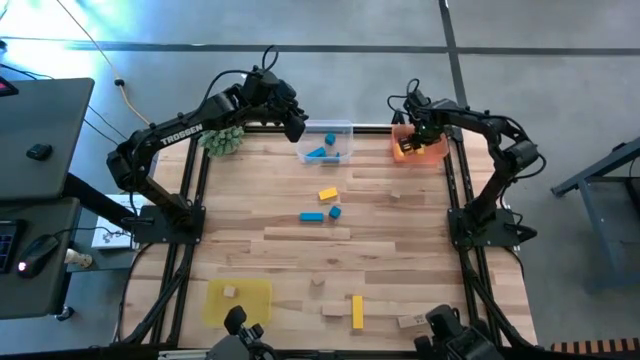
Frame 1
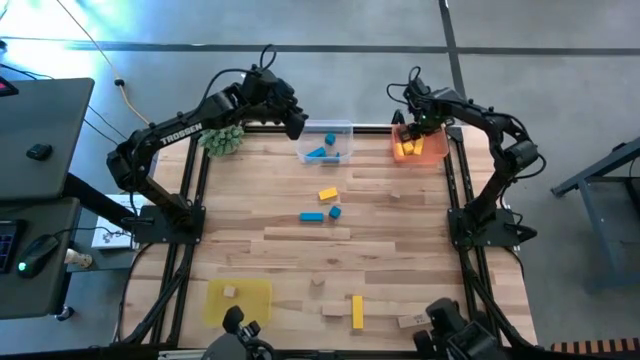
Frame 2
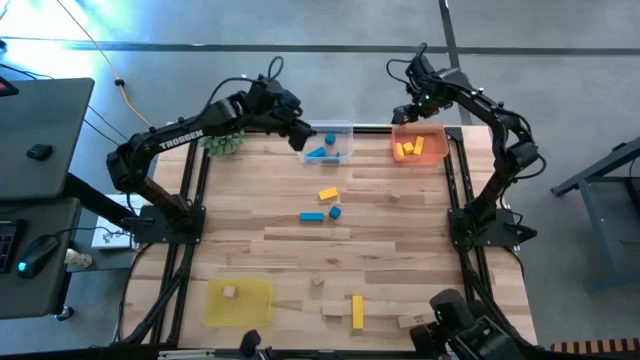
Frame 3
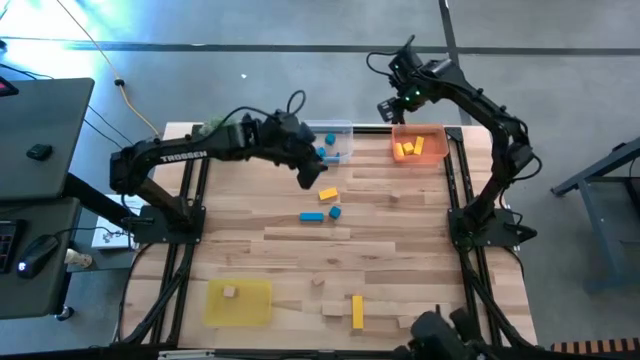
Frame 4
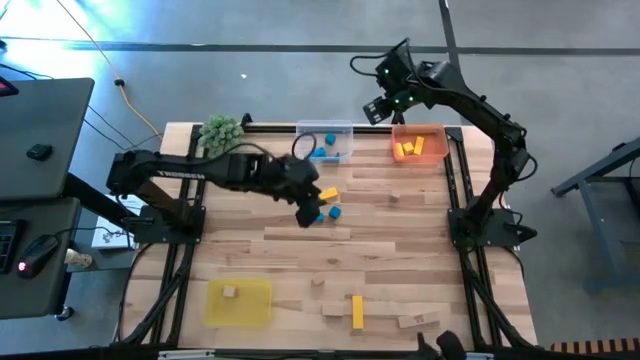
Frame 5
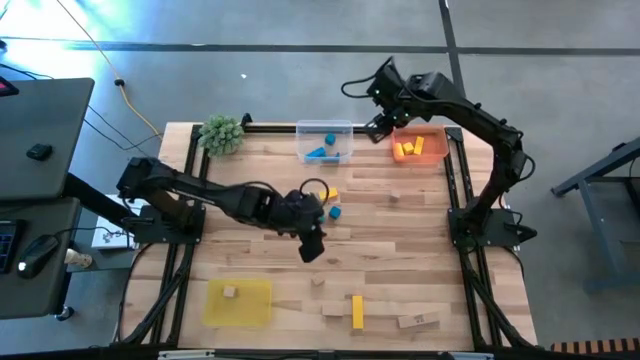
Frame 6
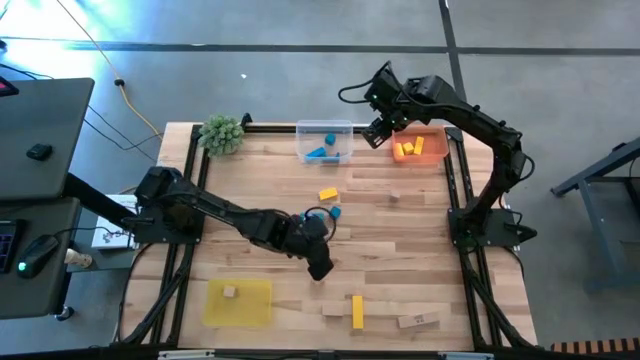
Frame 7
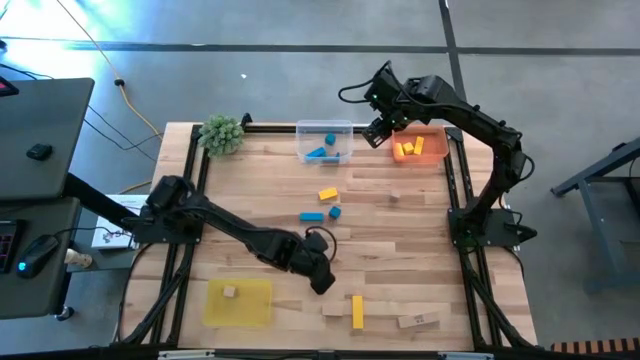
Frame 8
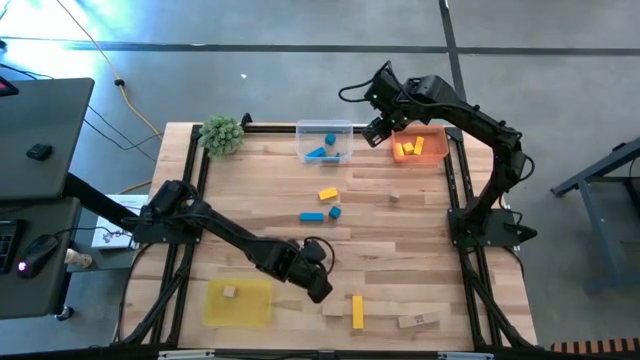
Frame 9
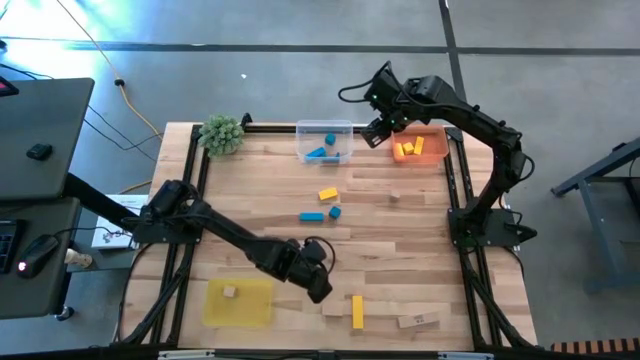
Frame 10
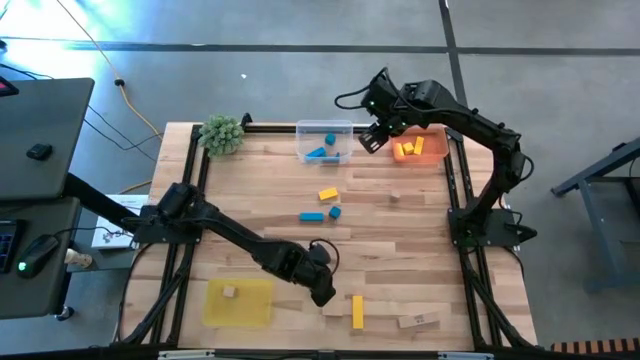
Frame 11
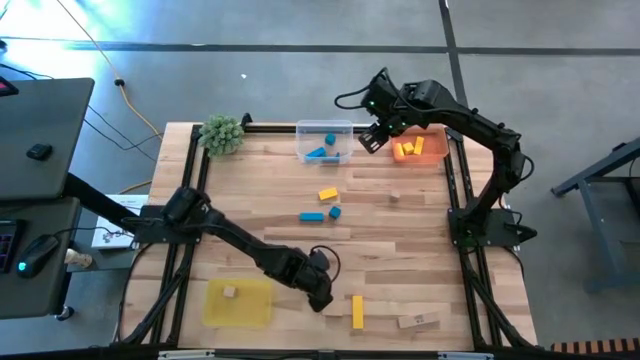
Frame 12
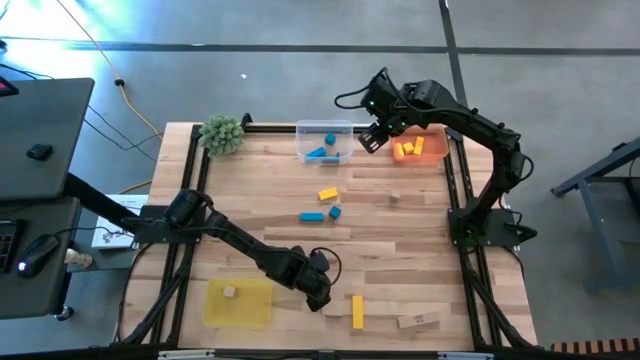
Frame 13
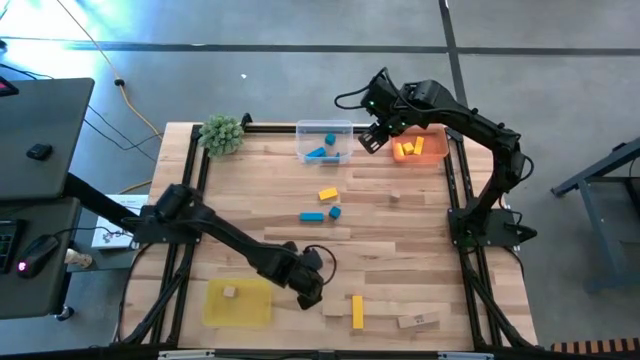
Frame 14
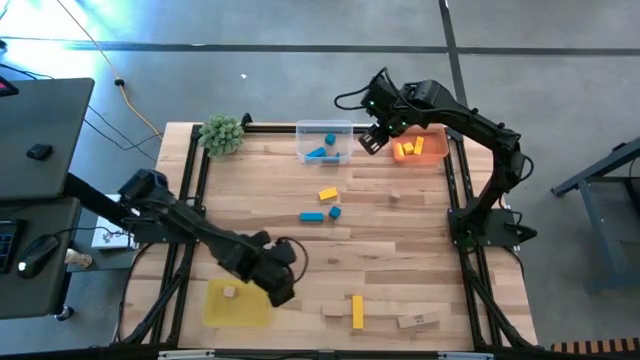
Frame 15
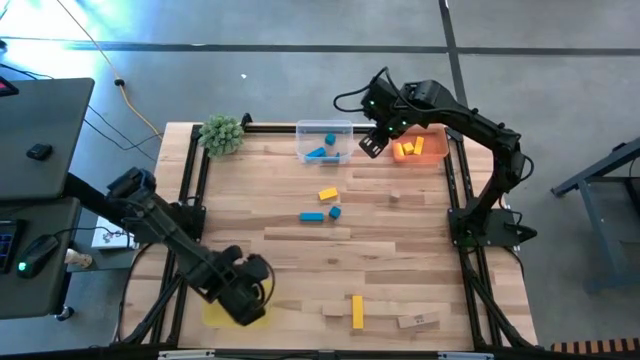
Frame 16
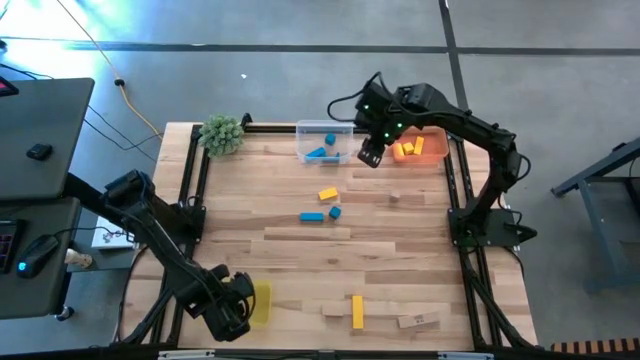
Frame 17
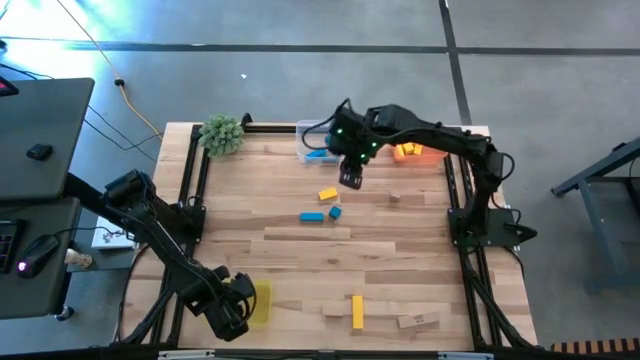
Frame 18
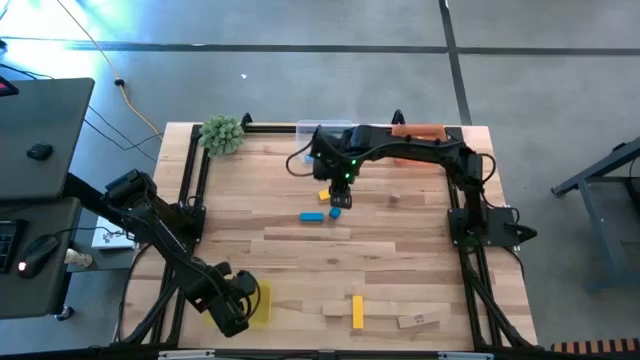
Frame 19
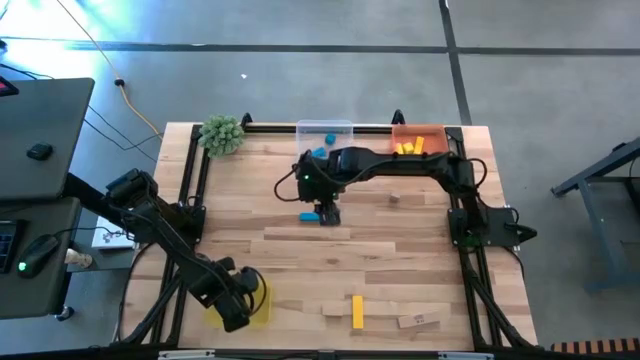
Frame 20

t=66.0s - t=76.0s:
Task: Sort & place blocks by color
Put the brown block into the yellow bin

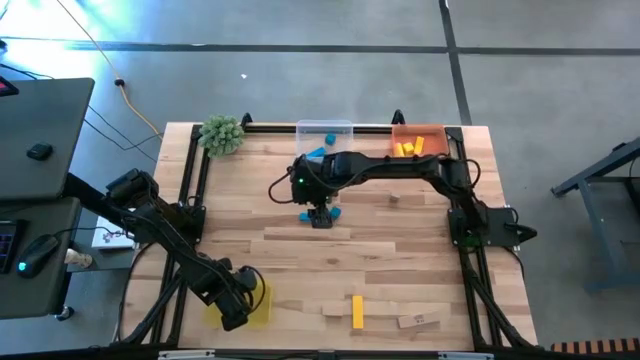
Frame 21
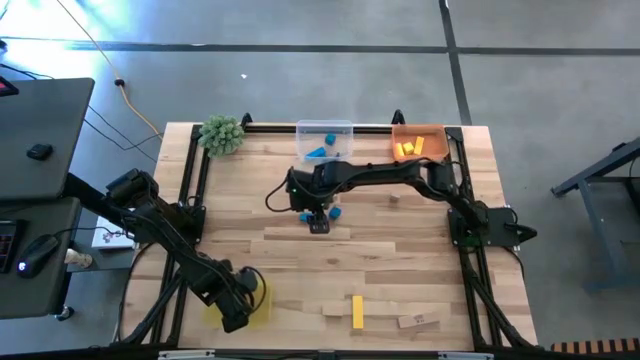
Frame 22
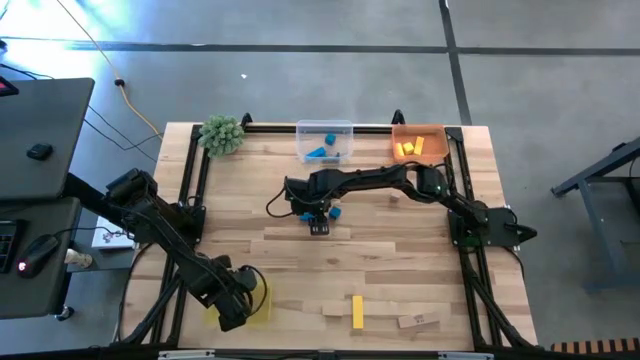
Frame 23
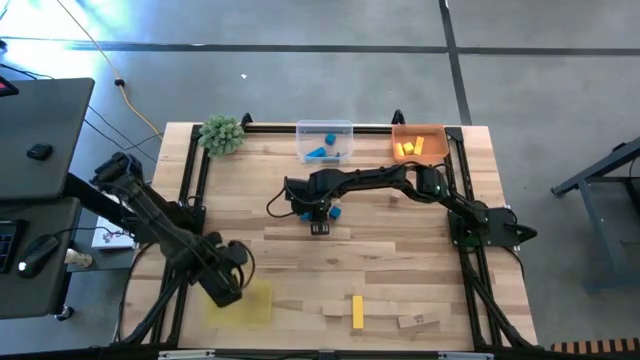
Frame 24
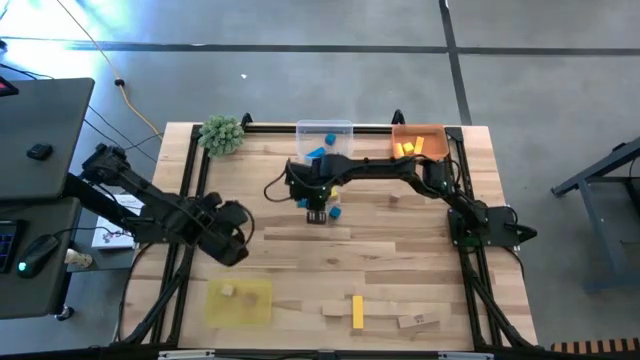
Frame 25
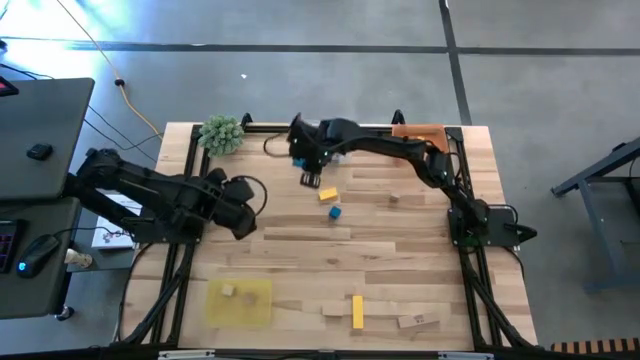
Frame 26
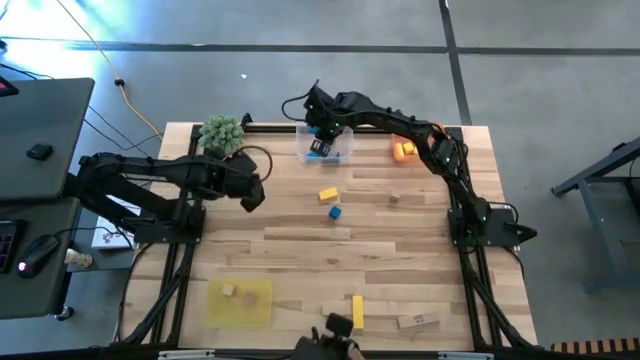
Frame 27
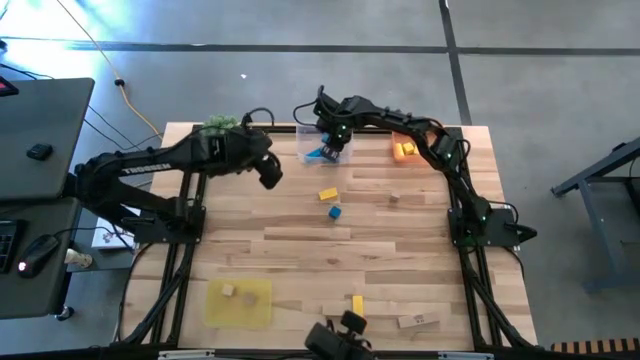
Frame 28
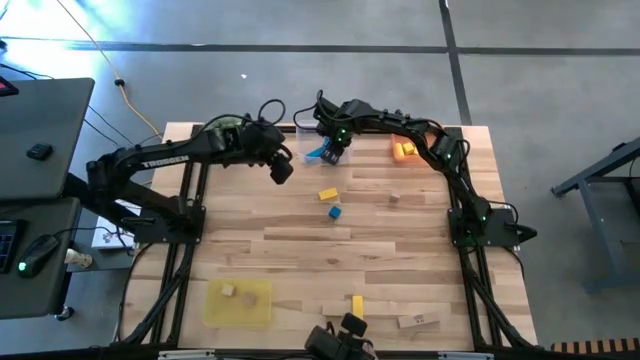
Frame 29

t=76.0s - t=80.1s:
Put the blue block into the transparent bin

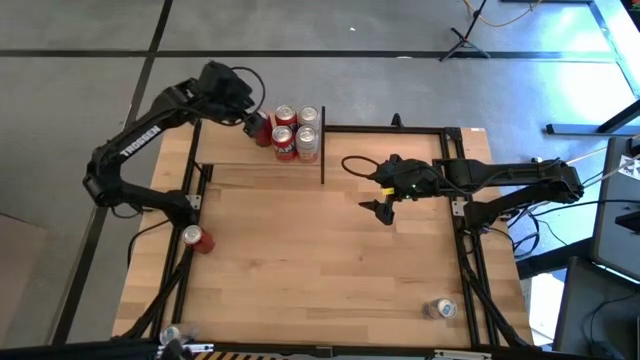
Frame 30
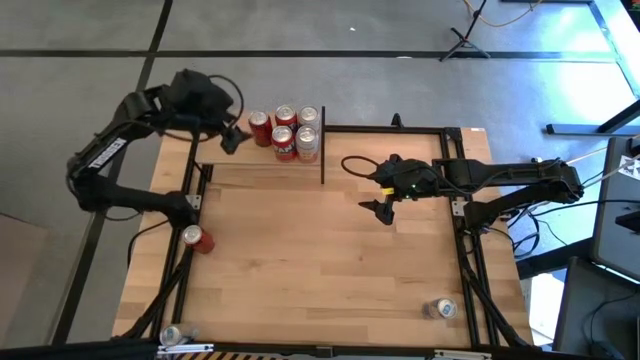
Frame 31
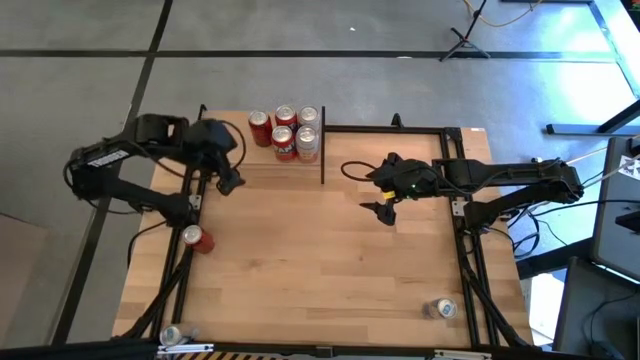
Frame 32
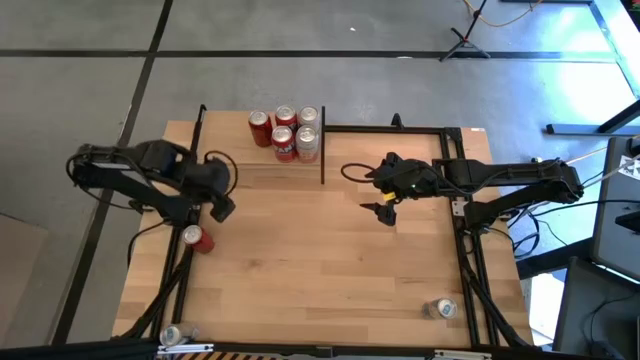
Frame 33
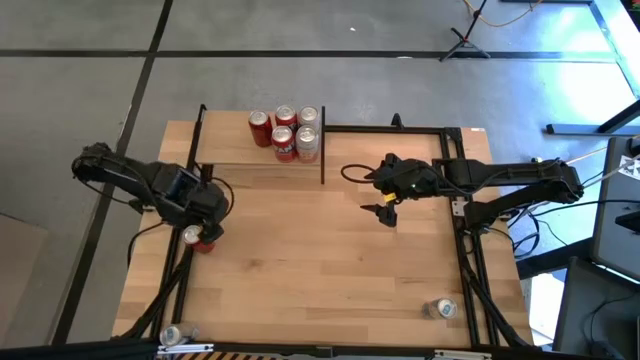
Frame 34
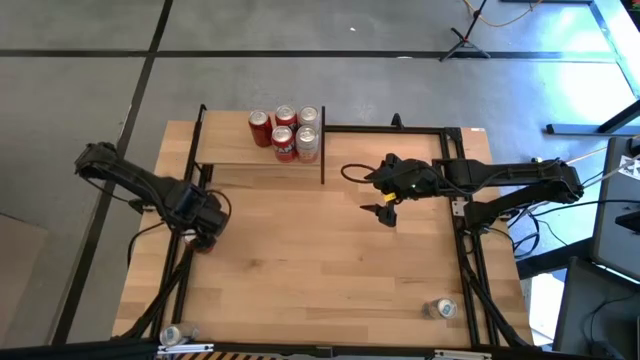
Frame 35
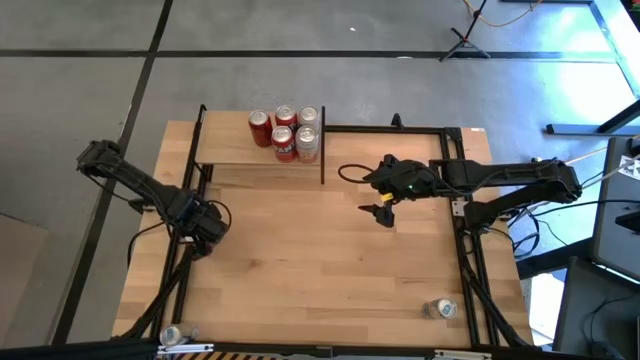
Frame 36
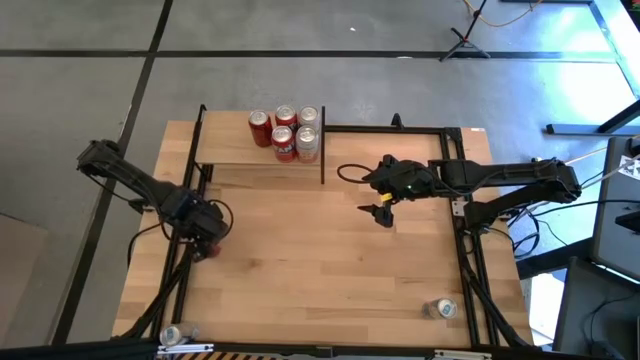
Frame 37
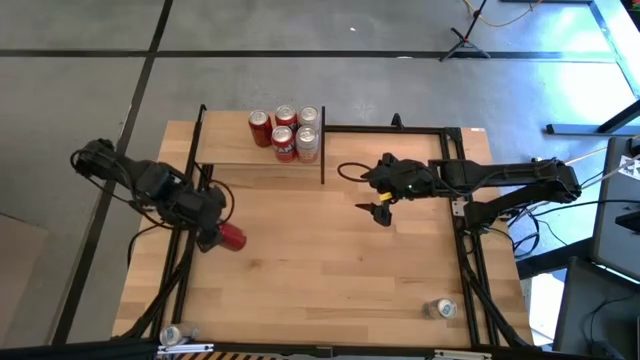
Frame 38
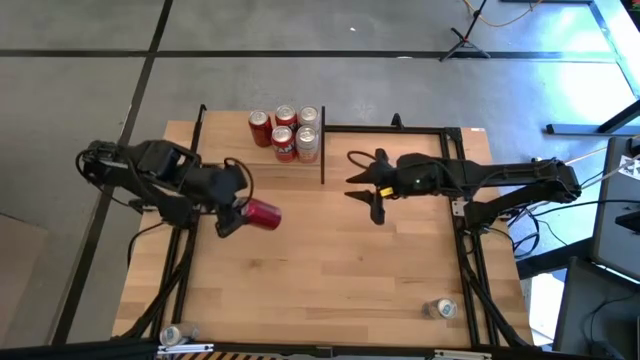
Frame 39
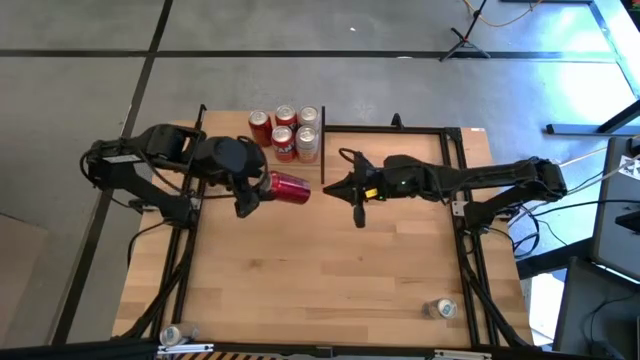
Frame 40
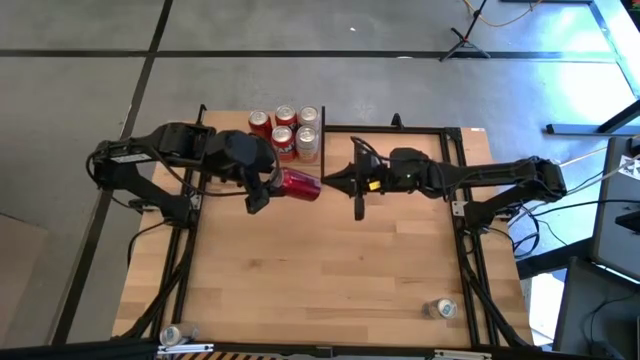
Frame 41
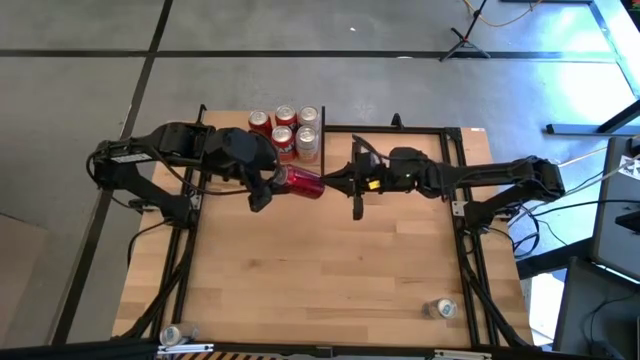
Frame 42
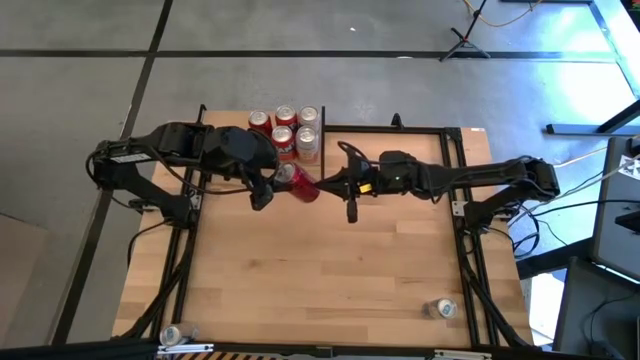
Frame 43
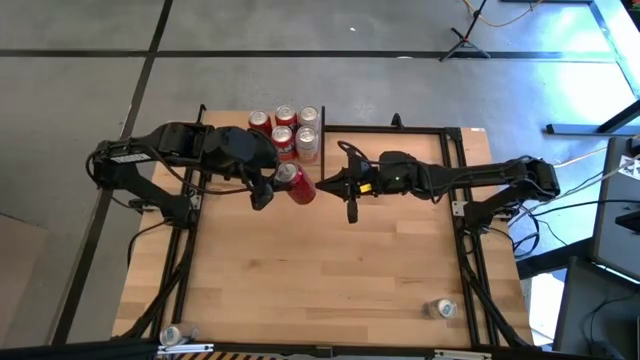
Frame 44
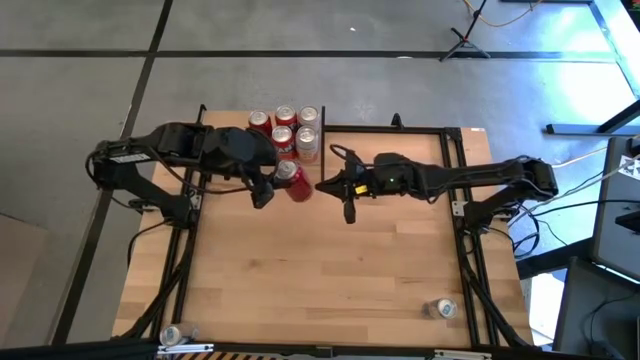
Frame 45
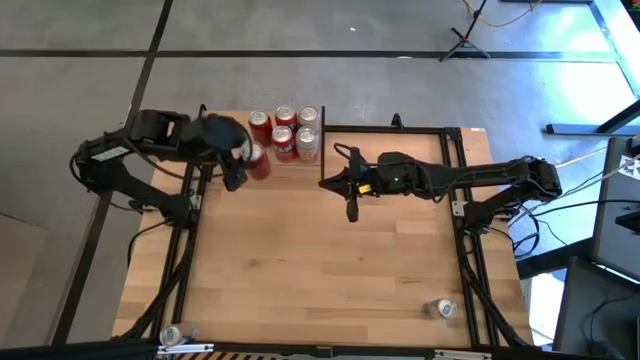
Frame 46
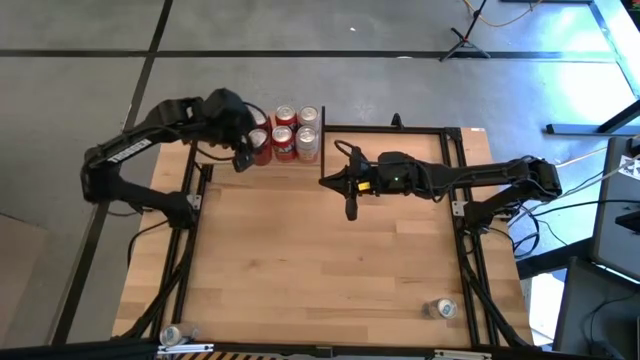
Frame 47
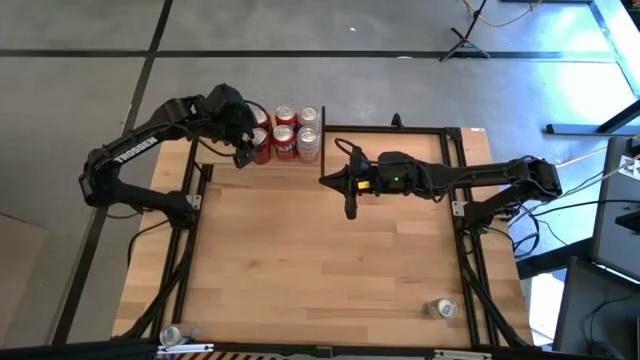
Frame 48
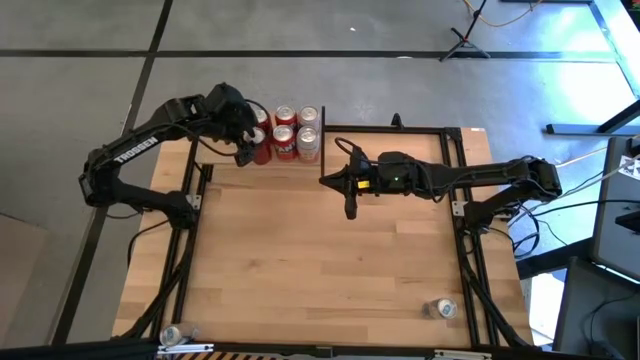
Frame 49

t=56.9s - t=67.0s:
Task: Place canned beverage on shelf
Put the red soda can on the shelf aligned with the other red soda can
